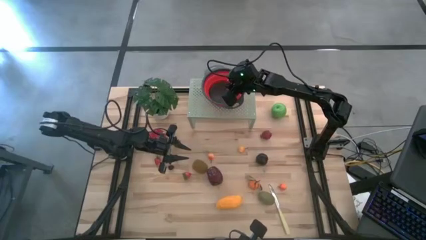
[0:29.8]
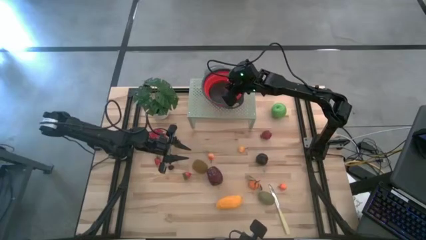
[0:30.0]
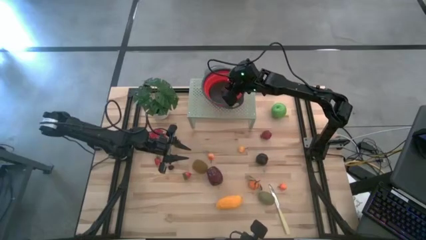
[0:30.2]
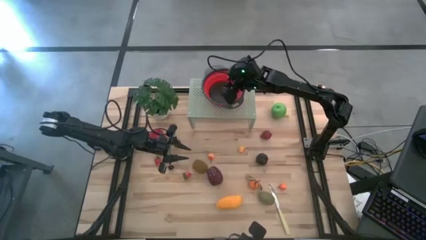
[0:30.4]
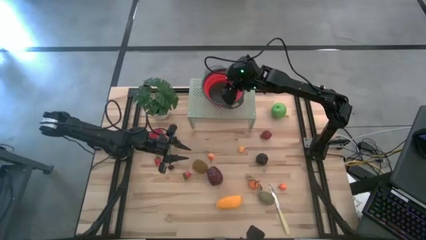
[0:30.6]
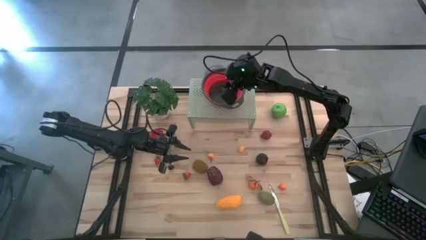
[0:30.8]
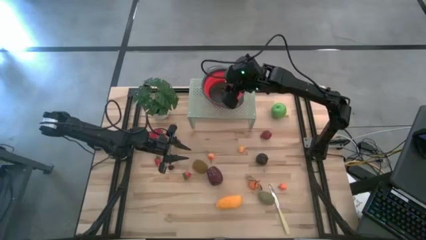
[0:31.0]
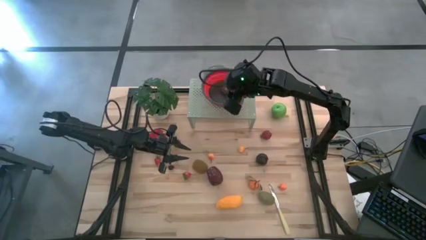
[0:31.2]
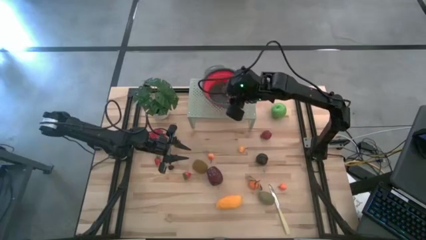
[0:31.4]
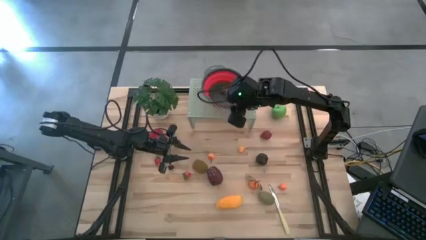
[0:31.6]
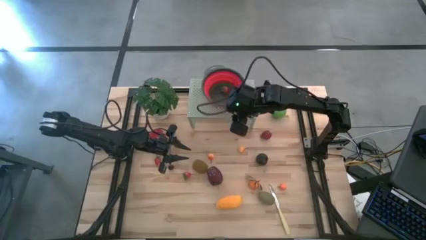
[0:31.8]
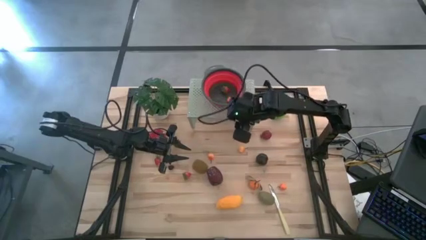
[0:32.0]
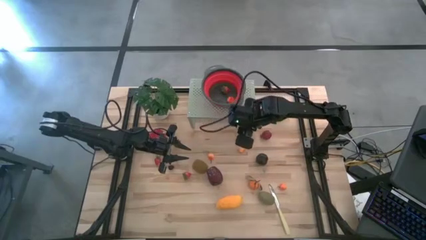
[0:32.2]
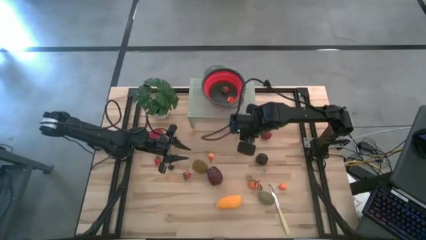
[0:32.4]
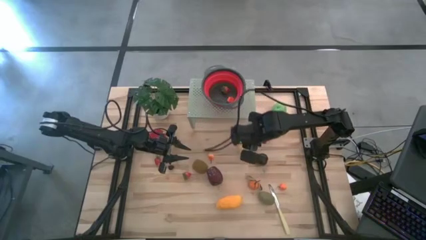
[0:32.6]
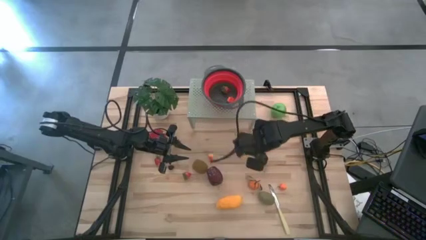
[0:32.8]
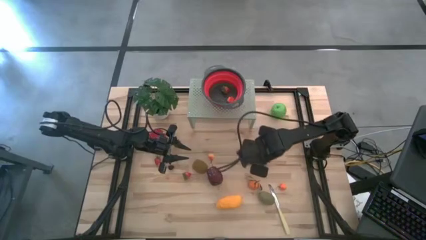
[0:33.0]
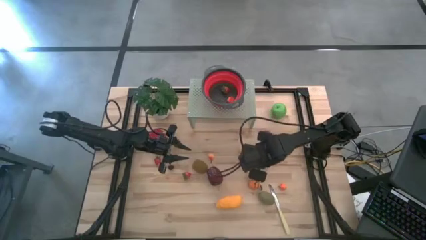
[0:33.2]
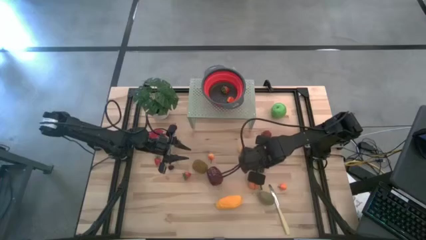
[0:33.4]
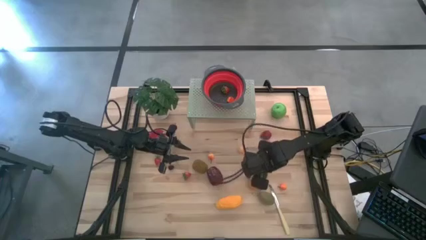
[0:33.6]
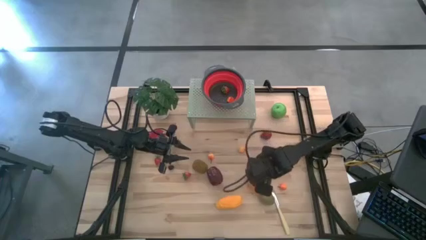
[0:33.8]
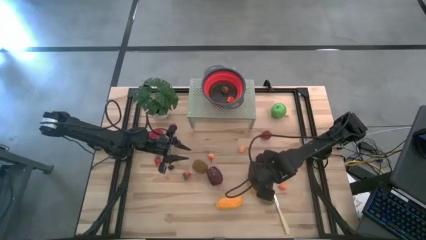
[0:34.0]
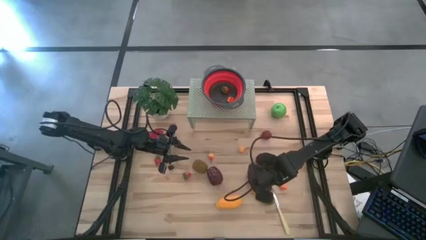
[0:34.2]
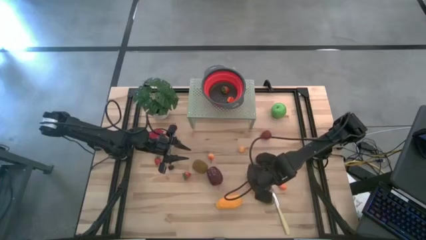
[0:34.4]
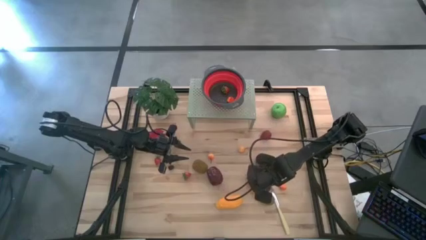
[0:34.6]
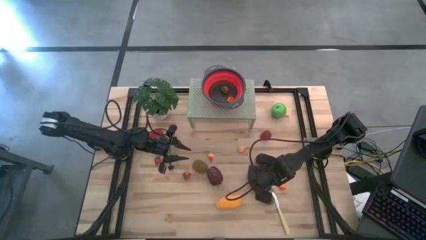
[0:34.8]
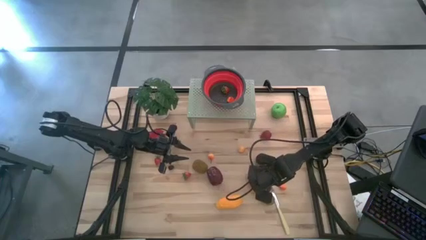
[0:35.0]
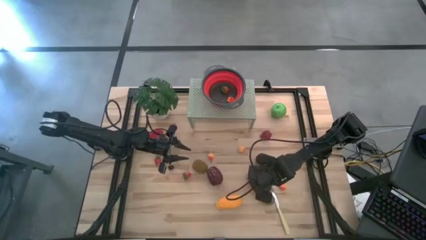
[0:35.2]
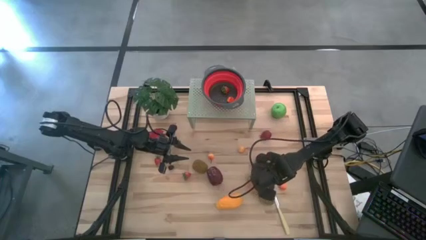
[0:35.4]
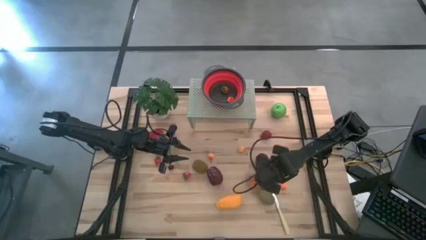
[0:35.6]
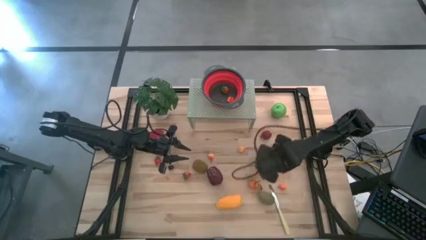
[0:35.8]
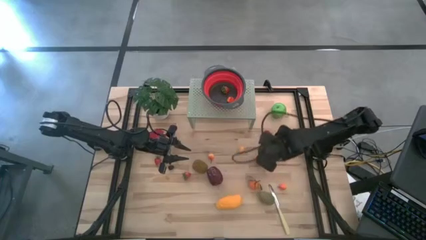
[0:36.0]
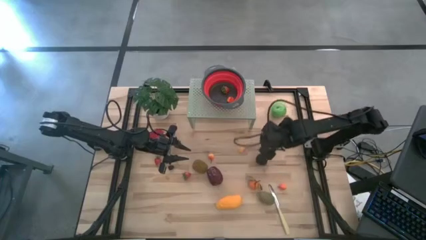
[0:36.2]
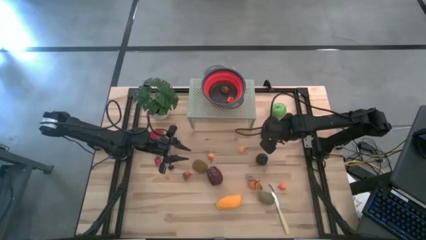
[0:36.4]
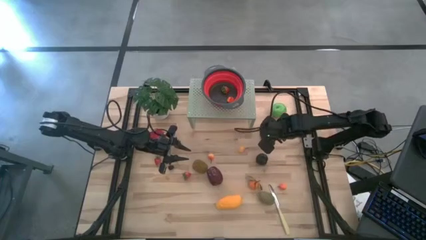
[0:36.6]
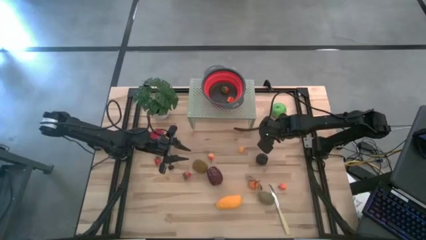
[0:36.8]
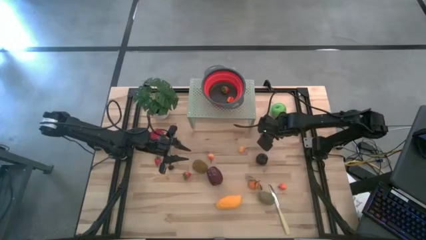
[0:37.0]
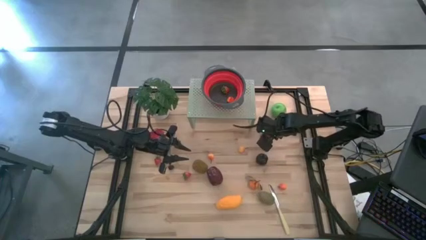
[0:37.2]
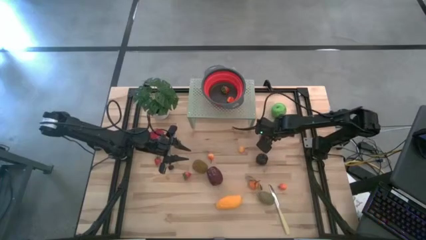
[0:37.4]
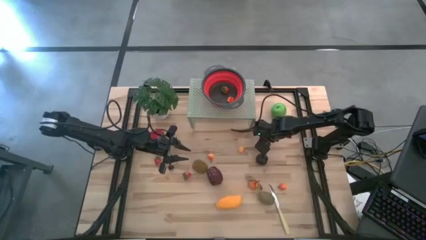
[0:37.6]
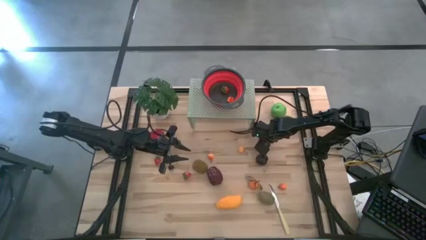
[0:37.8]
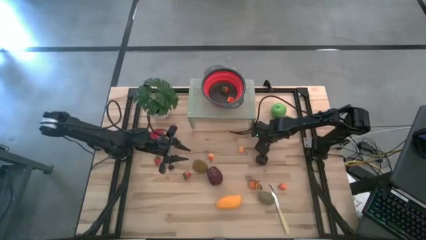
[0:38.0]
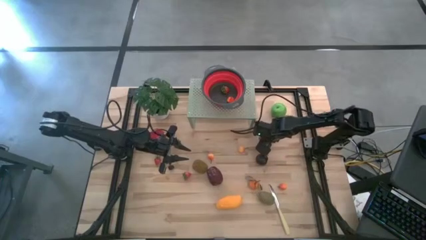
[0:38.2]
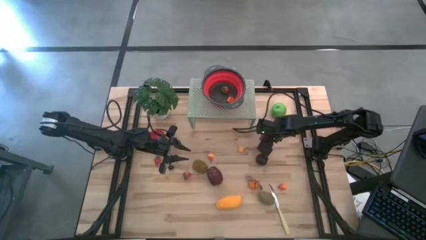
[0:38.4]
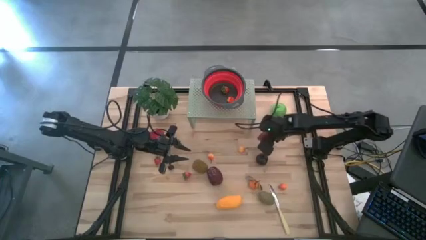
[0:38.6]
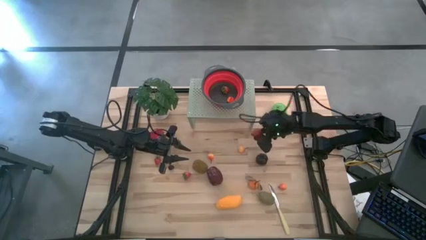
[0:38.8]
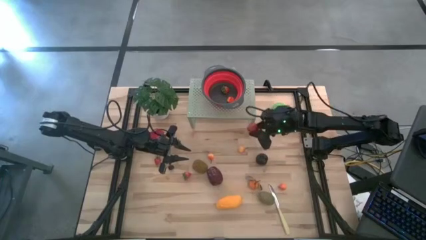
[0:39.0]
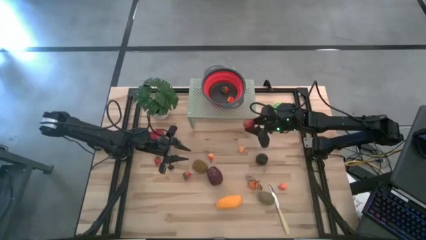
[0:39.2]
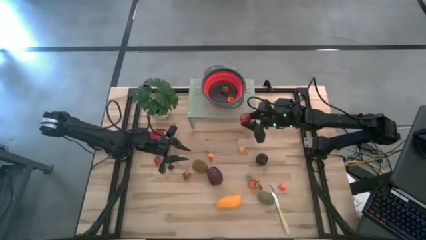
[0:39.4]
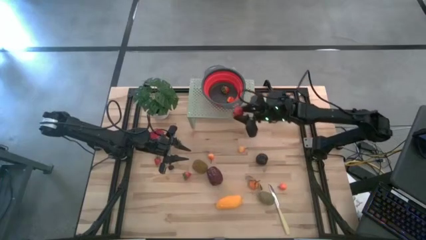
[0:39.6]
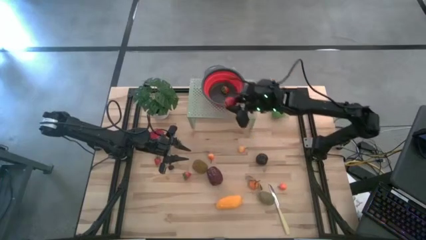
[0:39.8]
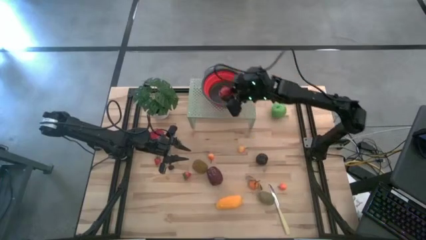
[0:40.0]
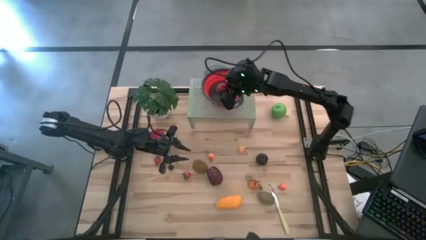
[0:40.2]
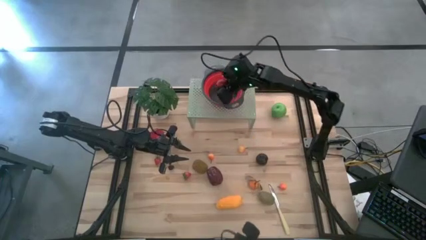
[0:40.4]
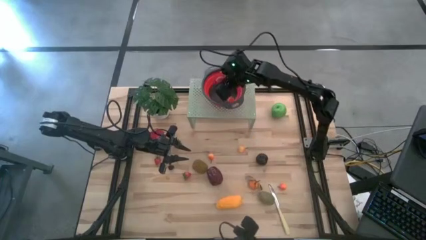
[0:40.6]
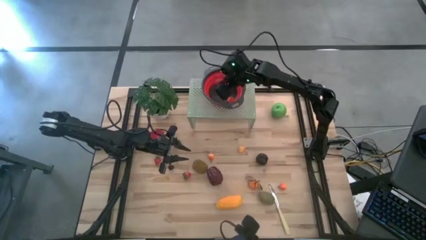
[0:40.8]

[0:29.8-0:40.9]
Task: Pick & Place Fruit
Put the pomegranate into the red strainer bowl on the shelf

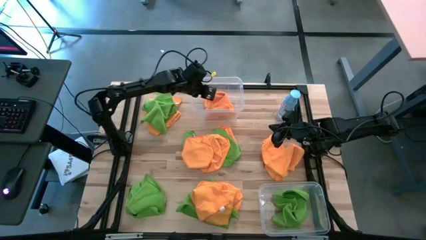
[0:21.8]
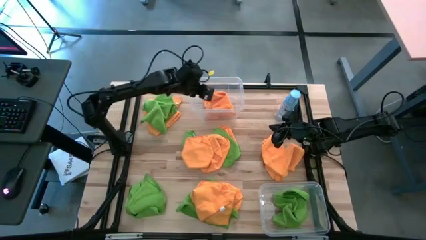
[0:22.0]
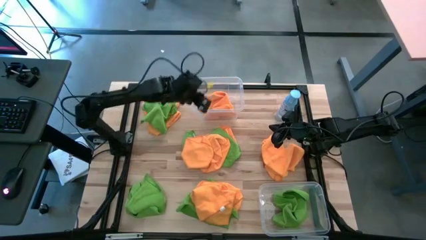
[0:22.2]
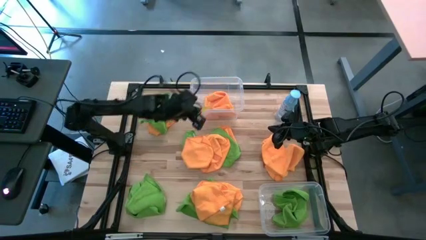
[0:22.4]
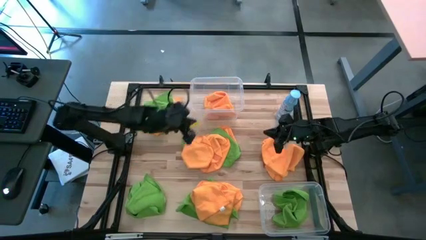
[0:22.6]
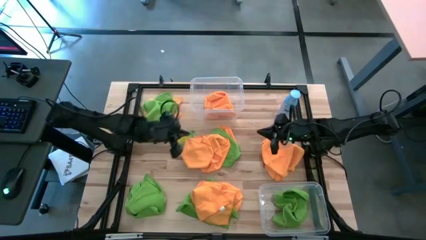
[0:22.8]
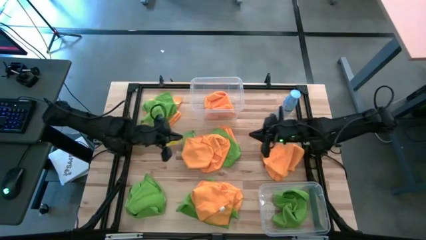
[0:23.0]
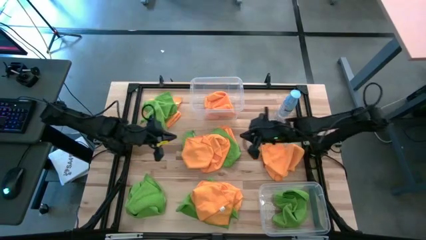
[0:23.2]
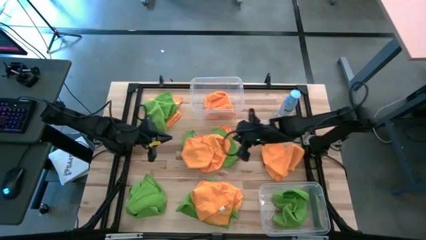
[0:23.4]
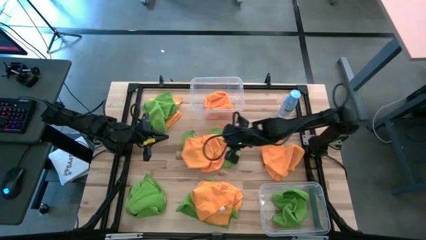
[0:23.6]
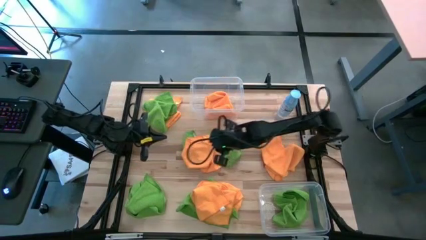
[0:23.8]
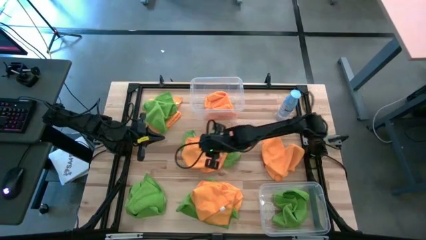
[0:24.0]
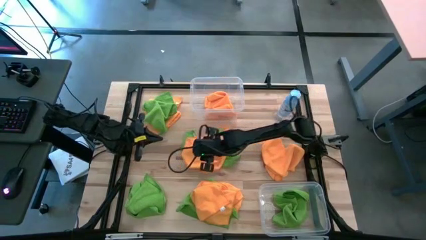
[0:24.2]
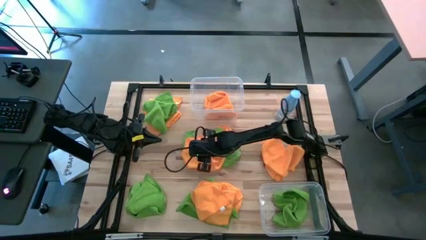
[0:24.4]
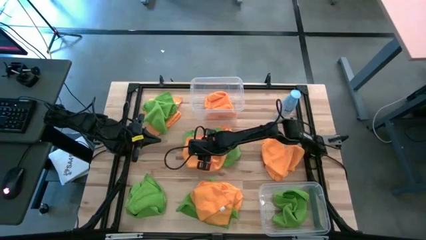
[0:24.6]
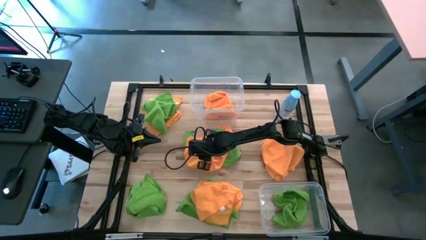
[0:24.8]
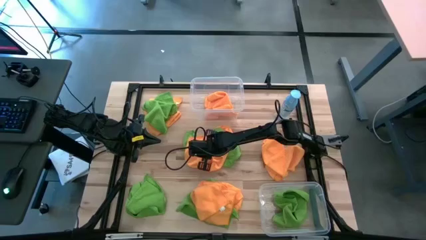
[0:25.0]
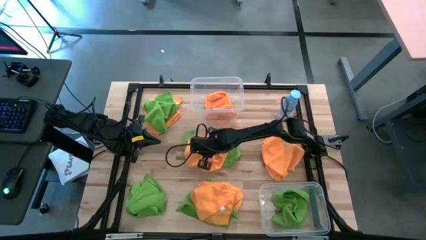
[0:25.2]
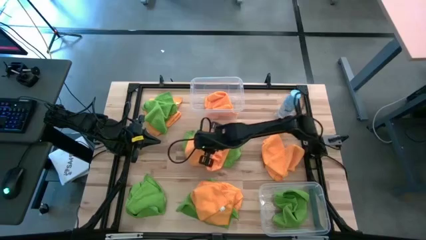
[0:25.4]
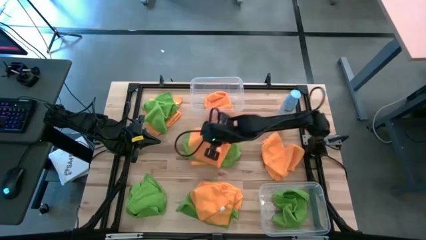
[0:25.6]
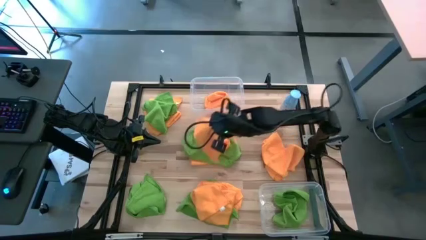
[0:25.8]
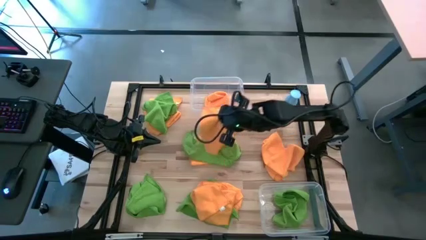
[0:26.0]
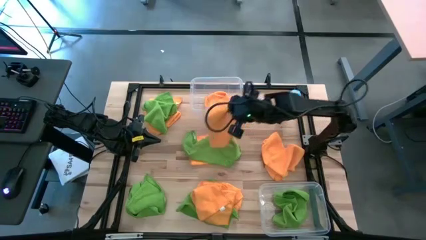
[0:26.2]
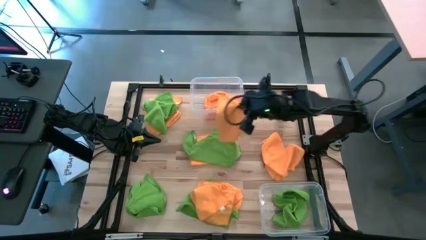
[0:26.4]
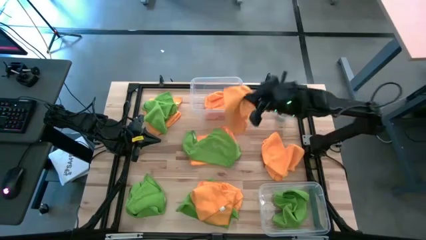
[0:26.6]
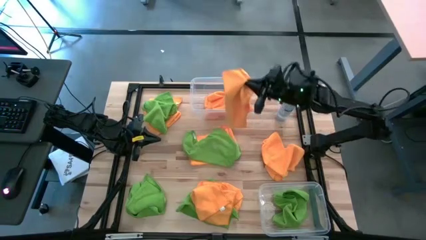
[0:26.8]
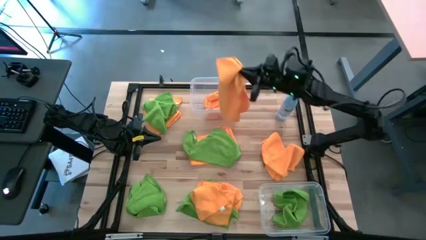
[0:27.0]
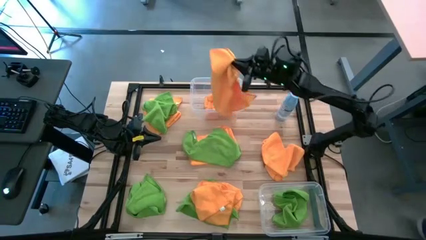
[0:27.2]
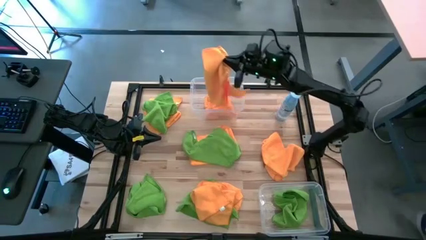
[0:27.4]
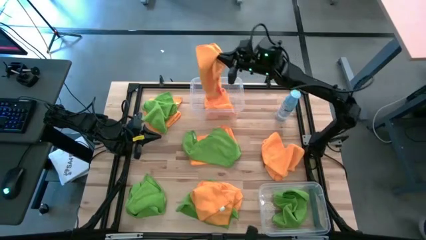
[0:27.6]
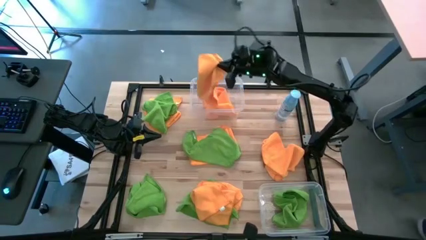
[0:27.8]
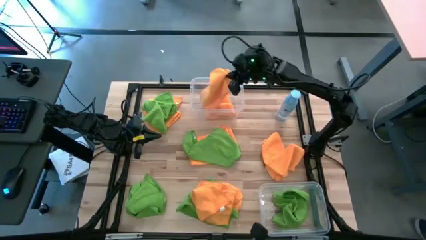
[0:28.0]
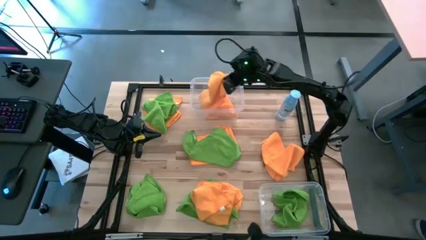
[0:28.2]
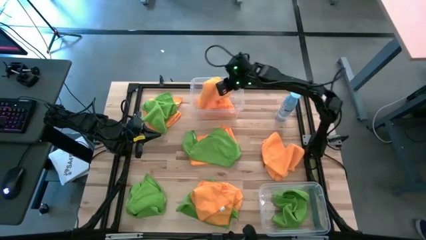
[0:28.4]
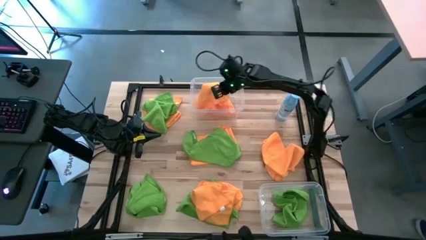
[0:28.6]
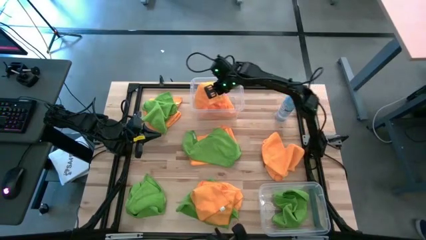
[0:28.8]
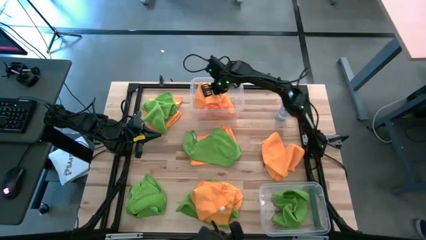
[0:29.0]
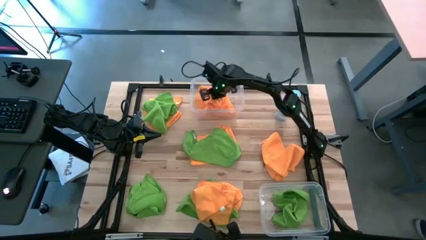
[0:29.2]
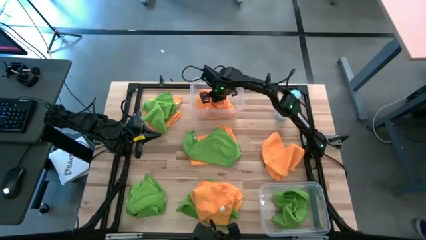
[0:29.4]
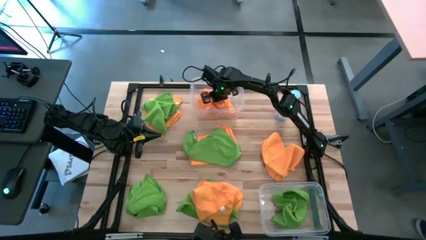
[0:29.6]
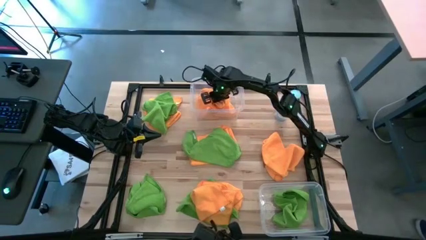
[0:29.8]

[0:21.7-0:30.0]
Task: Sort microfiber towel by color & place in baskets
Put the orange microfiber towel into the top transparent bin
